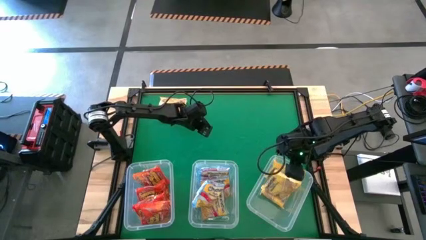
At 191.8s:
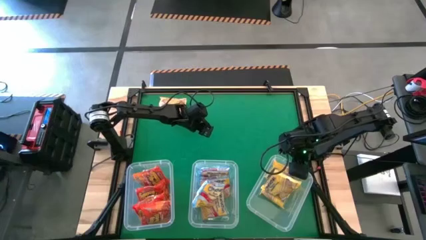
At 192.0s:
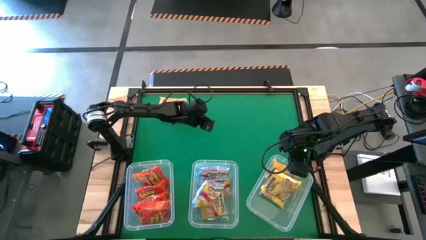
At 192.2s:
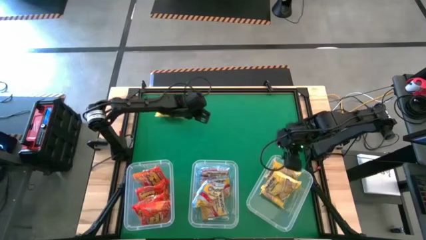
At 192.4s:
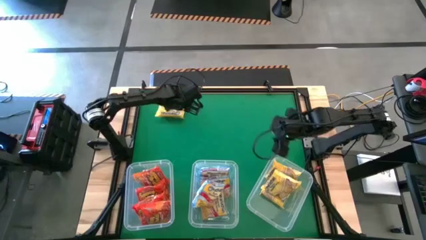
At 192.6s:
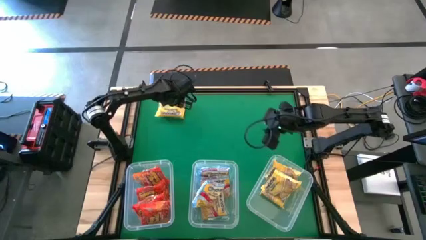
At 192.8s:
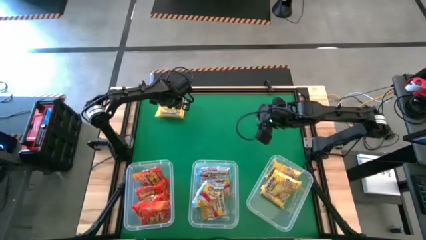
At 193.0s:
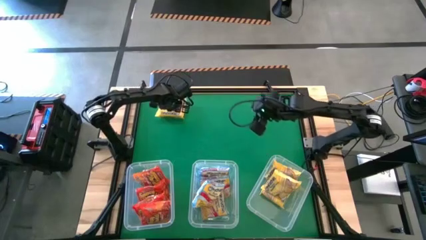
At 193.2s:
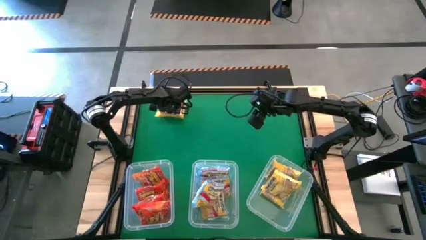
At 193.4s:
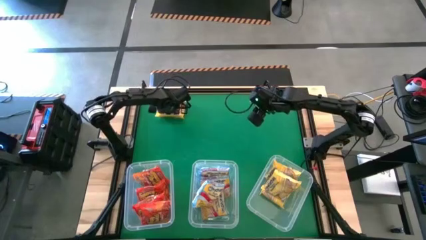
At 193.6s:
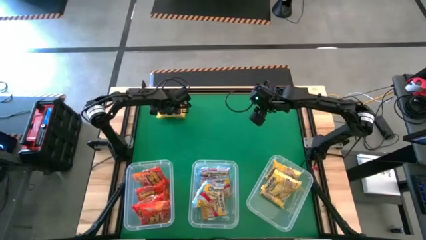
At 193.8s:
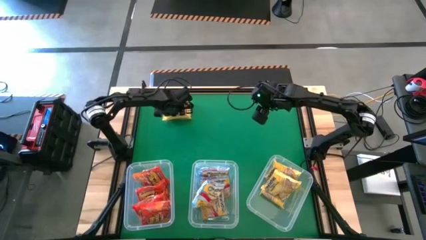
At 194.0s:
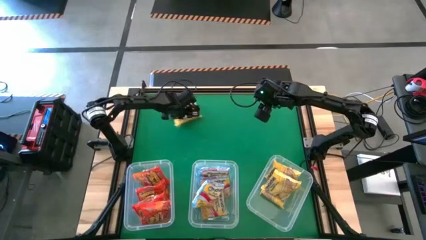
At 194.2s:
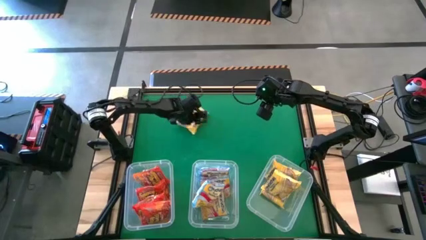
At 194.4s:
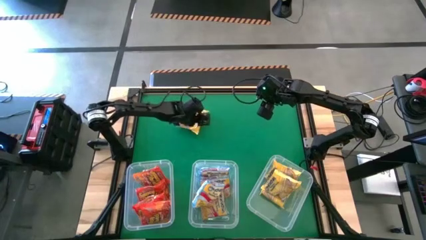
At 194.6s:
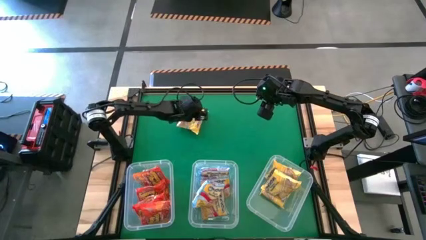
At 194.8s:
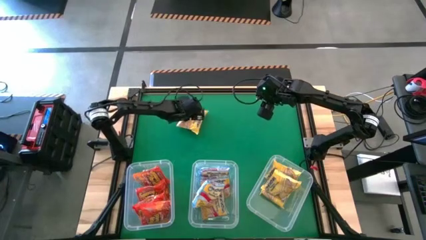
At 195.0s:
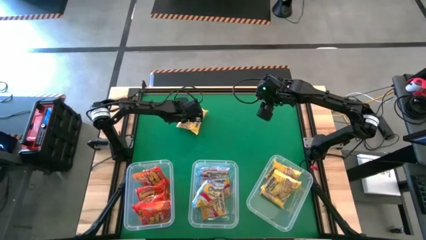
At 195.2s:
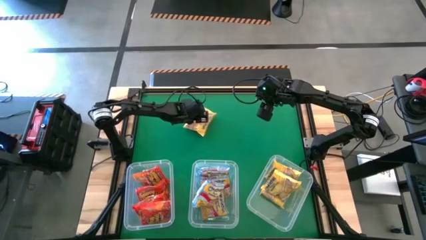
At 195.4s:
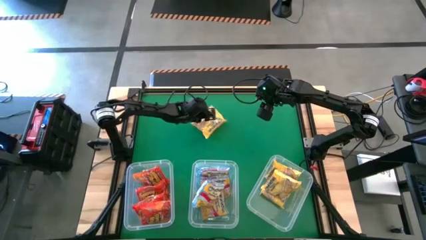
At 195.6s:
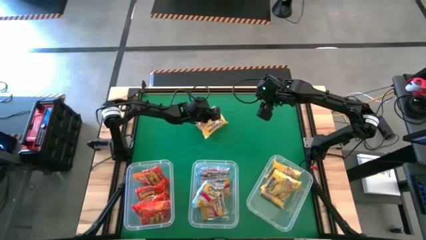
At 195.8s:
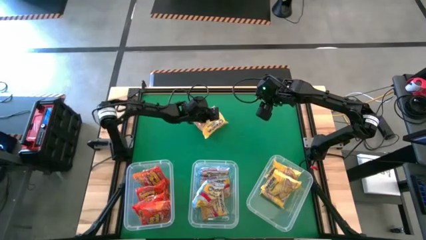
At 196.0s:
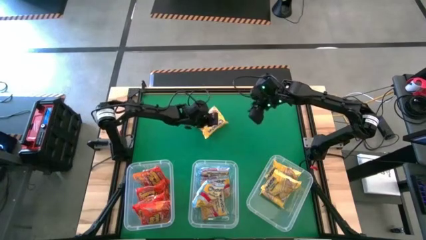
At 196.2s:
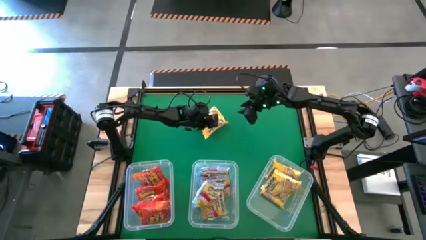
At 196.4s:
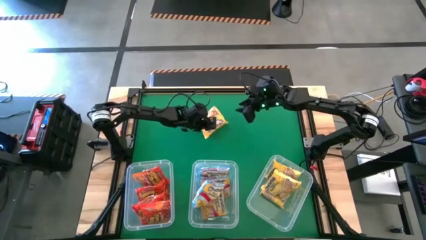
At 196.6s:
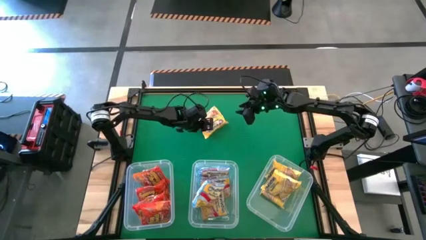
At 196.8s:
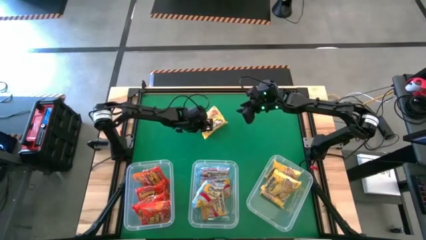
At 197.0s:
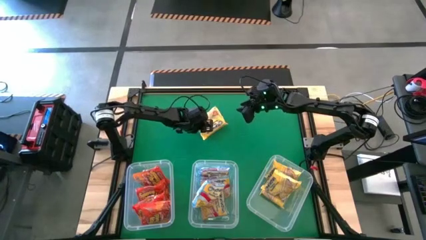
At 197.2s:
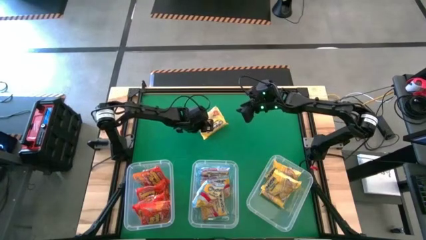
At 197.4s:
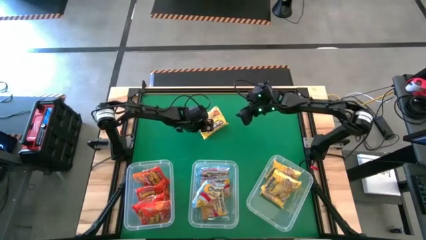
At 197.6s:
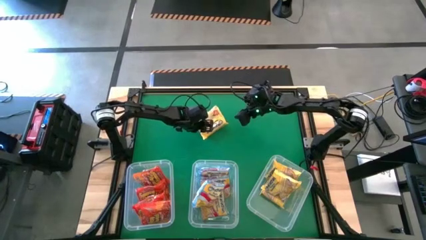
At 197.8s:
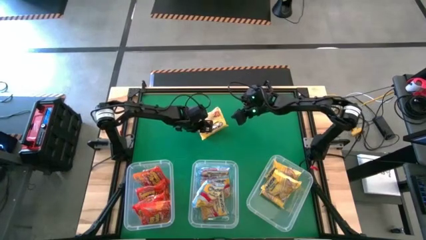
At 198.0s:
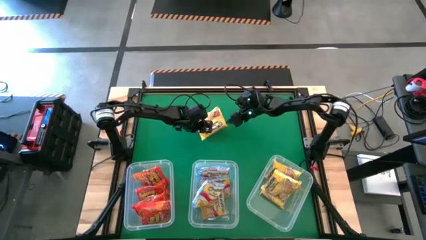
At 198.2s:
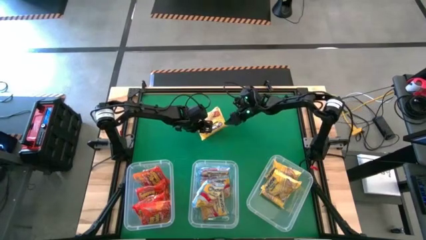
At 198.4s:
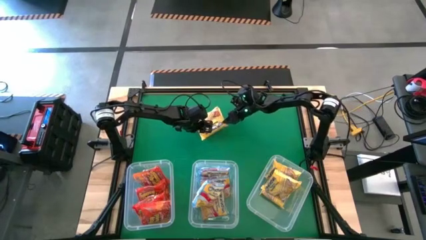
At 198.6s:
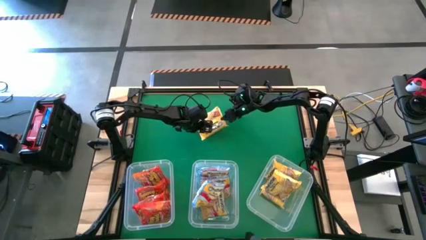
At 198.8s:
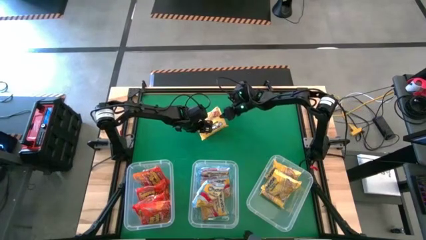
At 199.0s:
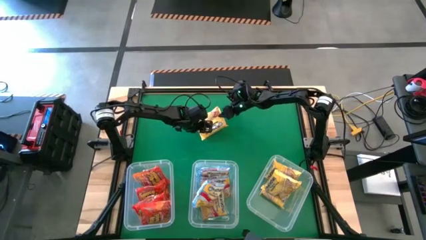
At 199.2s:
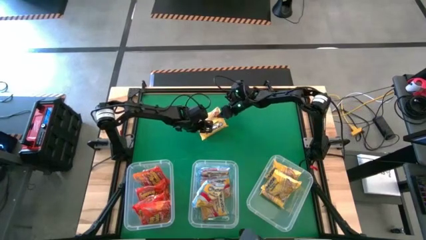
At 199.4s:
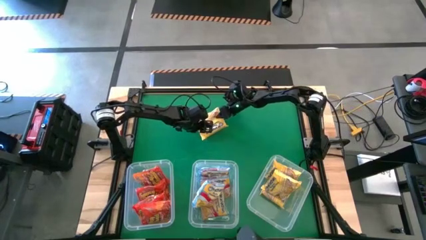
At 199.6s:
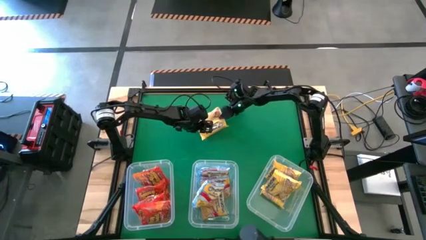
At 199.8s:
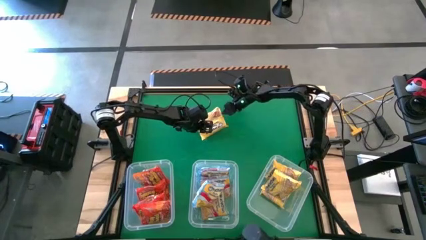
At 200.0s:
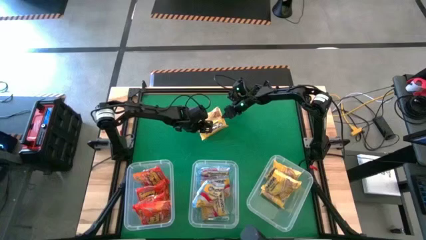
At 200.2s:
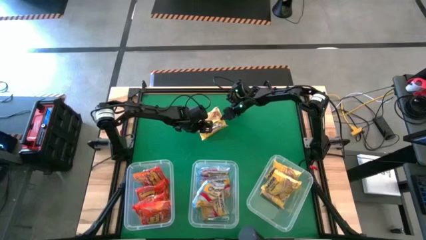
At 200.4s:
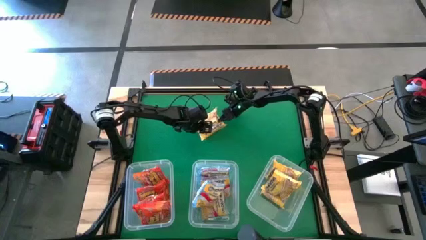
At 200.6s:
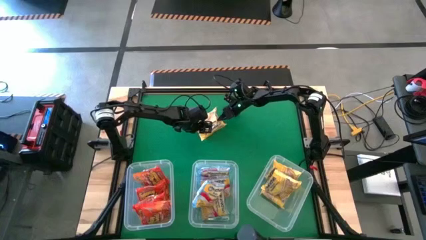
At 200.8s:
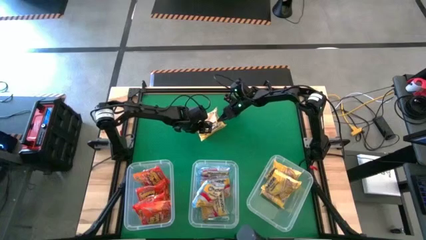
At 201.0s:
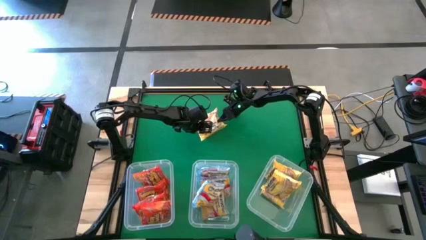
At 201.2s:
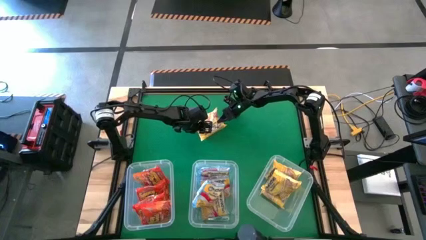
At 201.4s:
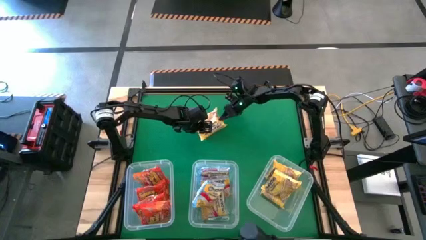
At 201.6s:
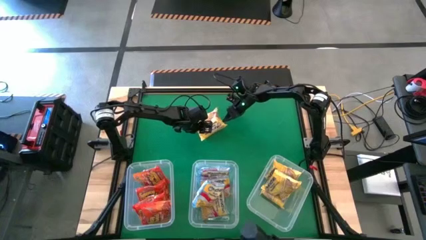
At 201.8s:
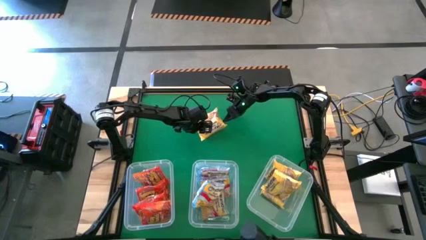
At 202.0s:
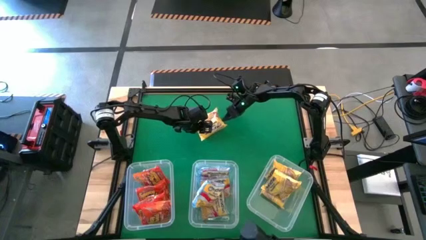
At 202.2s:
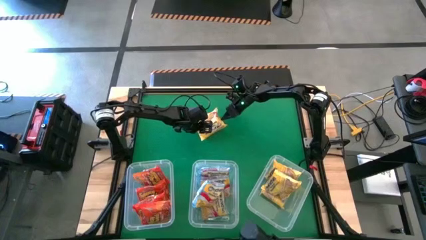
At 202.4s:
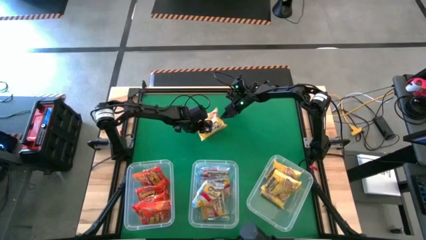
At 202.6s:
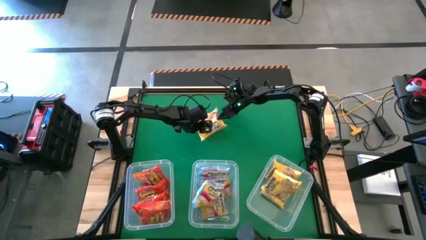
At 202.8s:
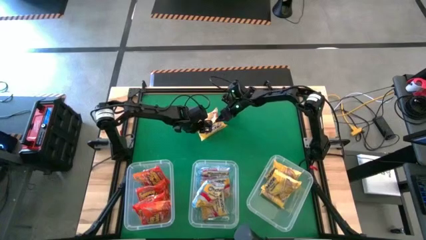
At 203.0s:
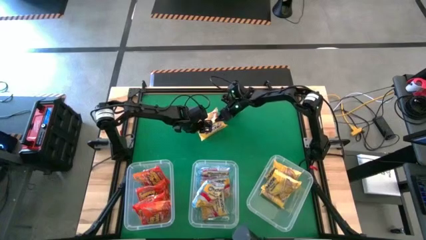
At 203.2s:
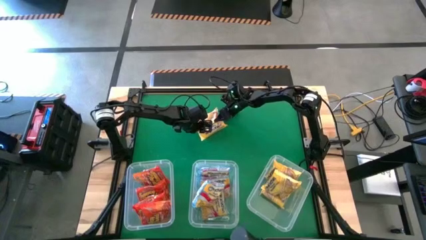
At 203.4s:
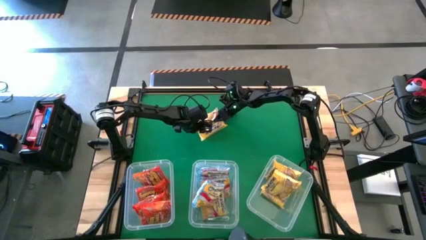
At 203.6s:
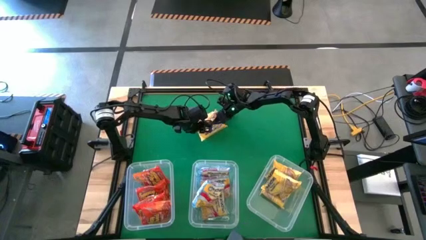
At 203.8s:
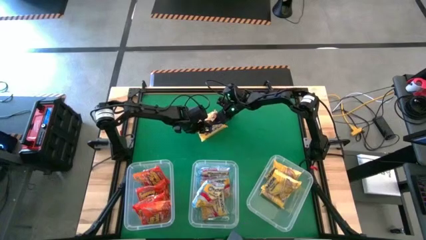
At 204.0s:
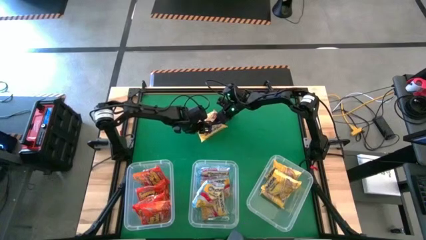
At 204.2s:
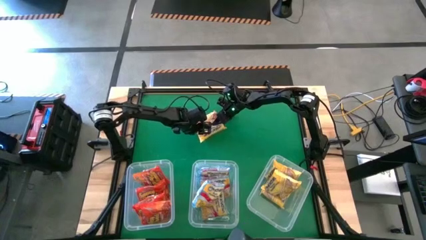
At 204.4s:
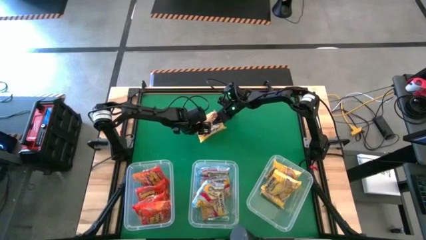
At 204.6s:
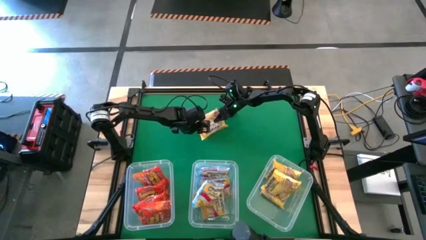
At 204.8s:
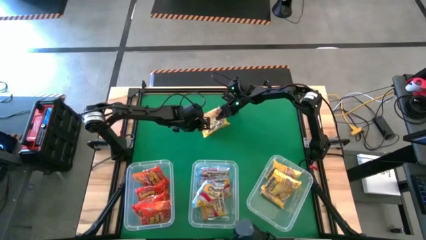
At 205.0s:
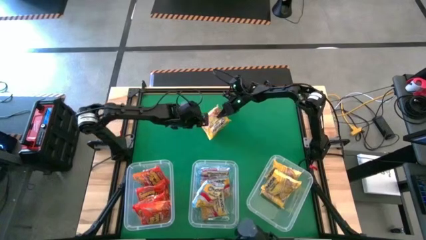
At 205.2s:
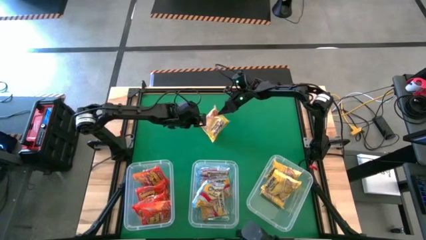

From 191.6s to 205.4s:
Task: Sort Maruchan noodles
Put the yellow noodle pack into the right transparent bin
